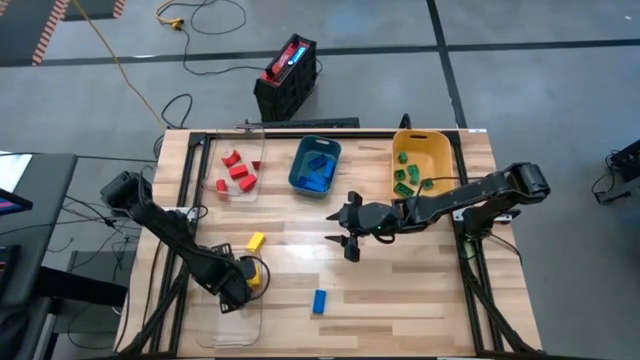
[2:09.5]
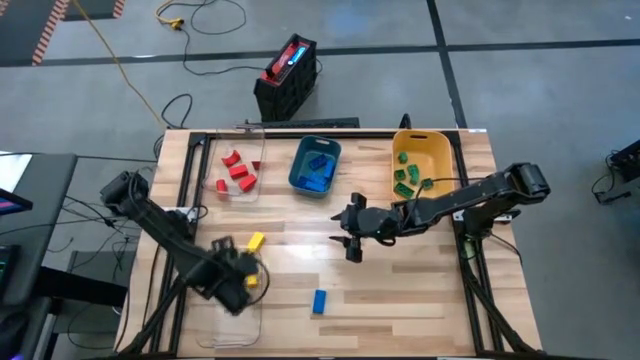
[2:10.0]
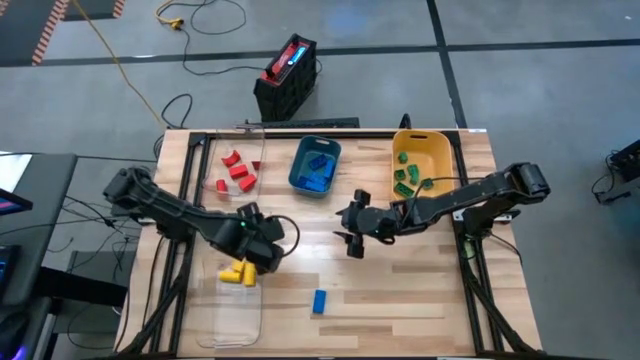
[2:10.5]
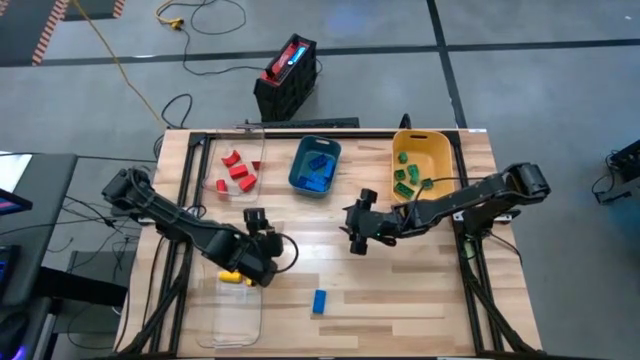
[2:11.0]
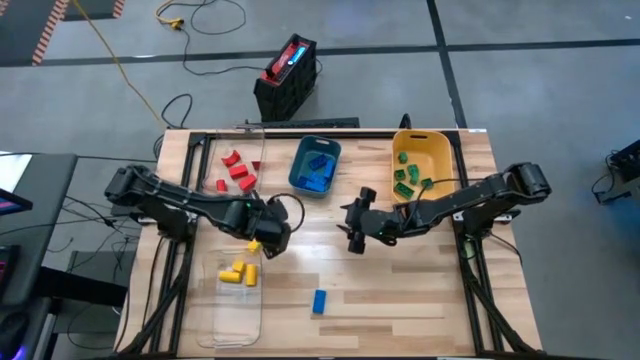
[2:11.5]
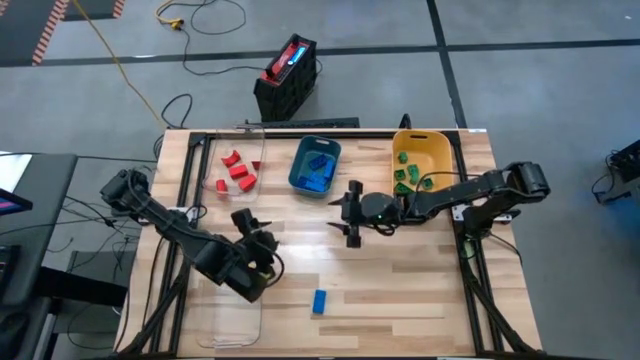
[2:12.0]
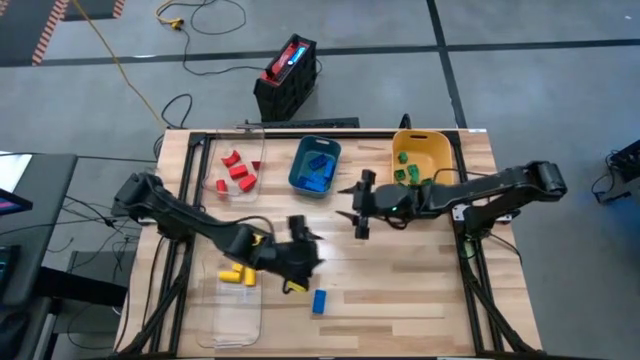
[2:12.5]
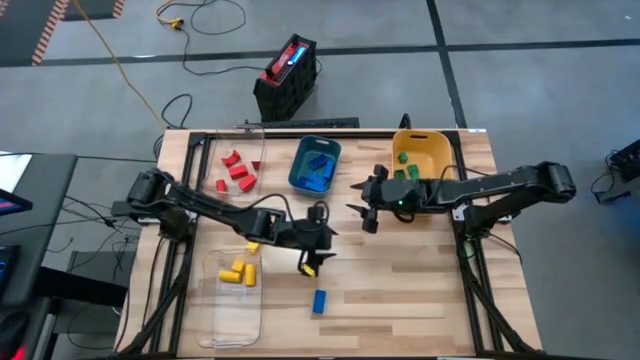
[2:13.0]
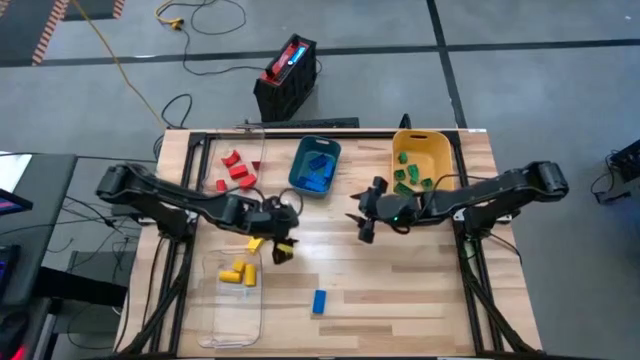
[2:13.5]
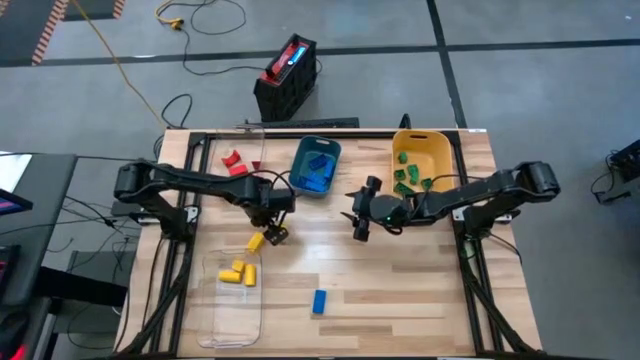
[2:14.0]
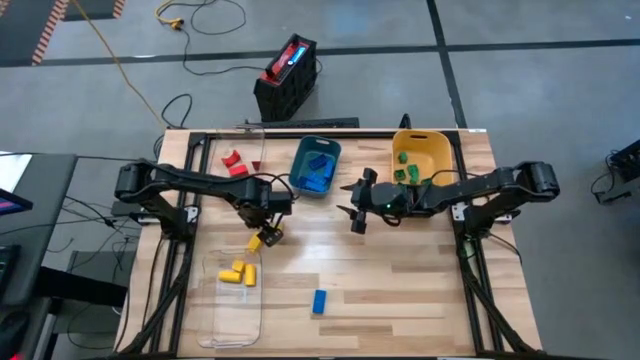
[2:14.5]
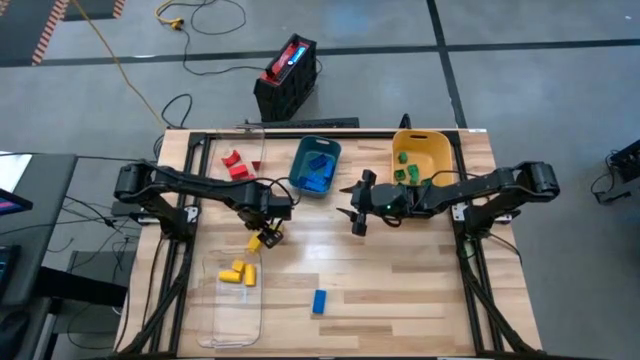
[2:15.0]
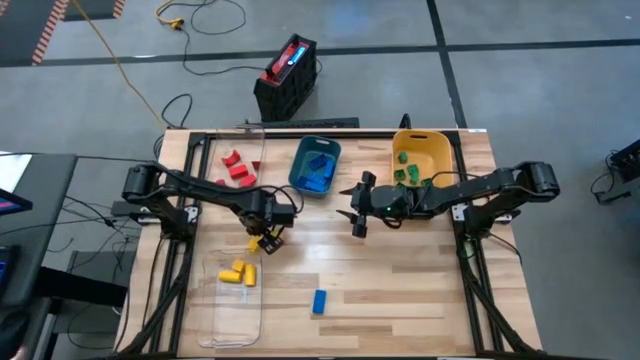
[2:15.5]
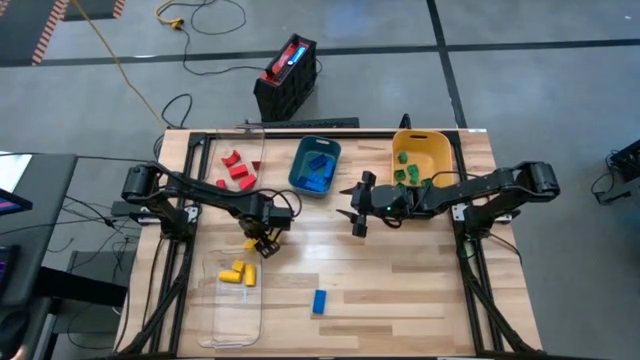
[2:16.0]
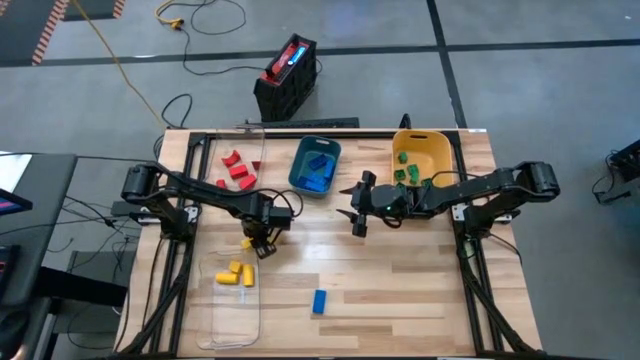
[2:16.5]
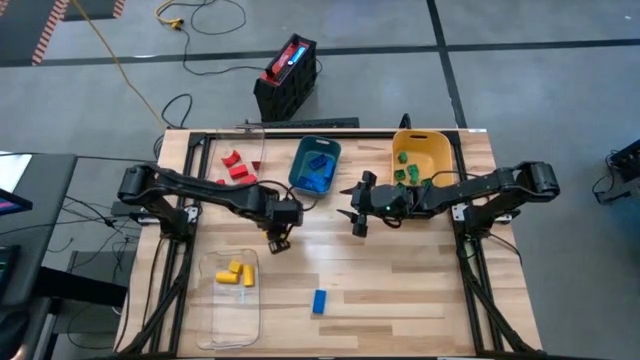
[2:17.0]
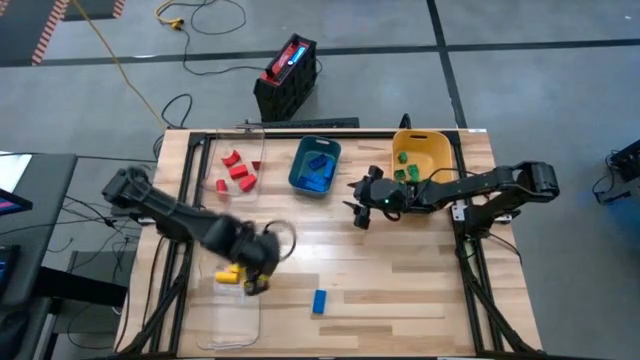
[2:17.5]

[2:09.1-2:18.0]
Task: Sort blocks
Put the yellow block into the bottom transparent bin

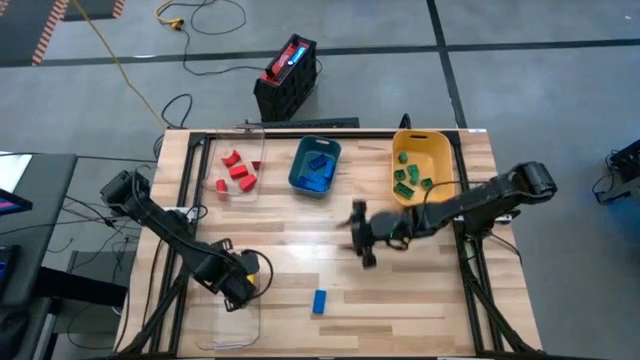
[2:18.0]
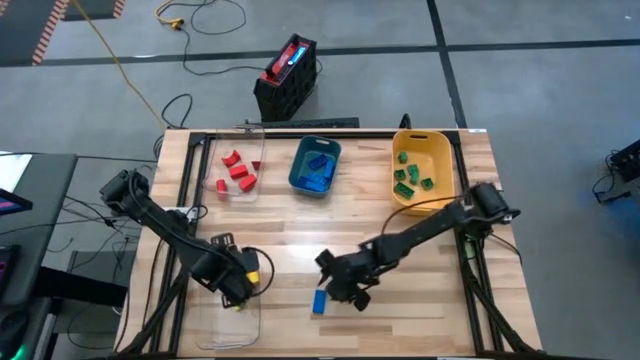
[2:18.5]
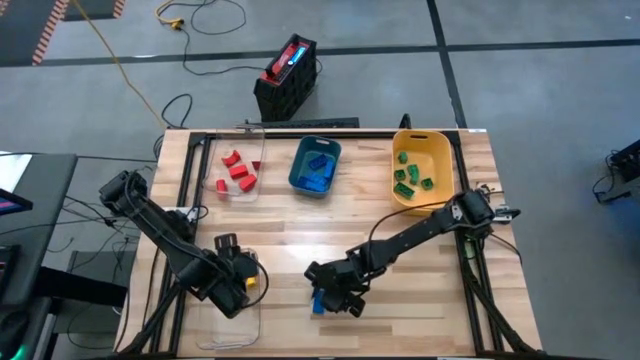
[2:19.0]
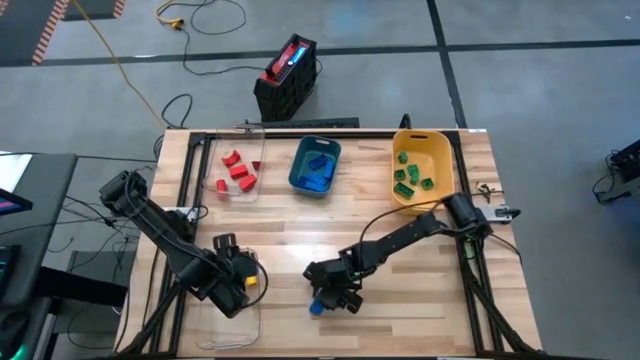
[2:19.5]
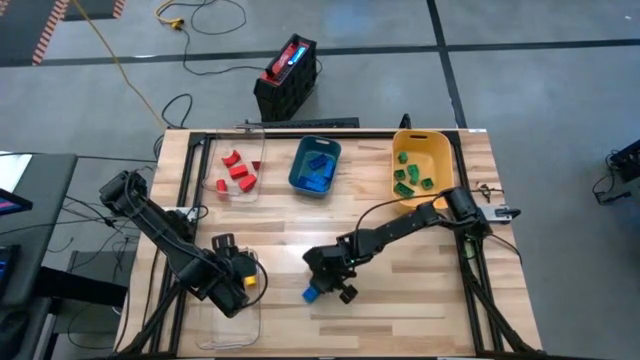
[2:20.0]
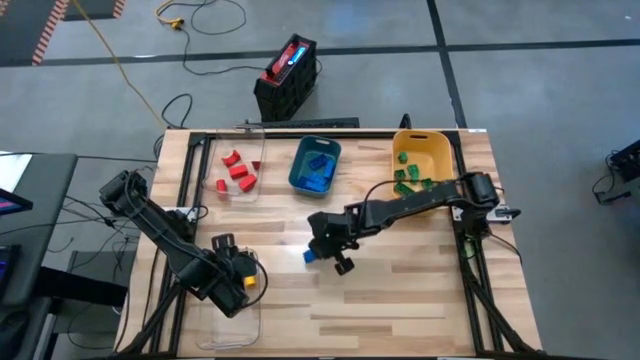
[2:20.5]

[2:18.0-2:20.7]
Put the blue game piece into the blue bin

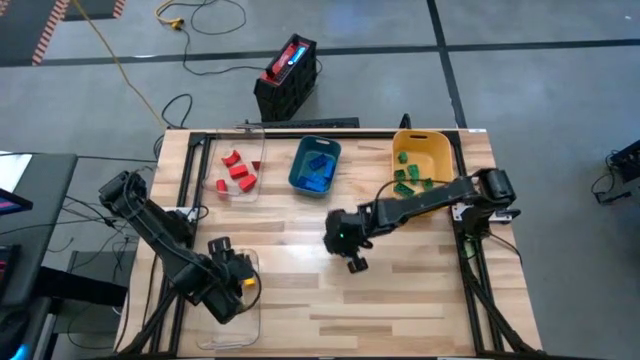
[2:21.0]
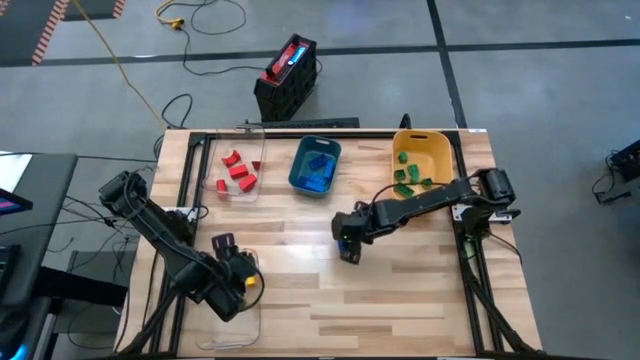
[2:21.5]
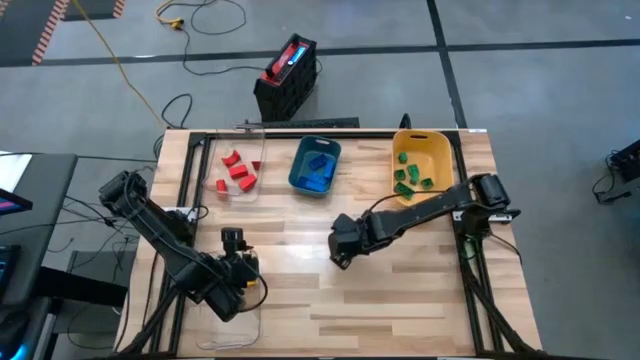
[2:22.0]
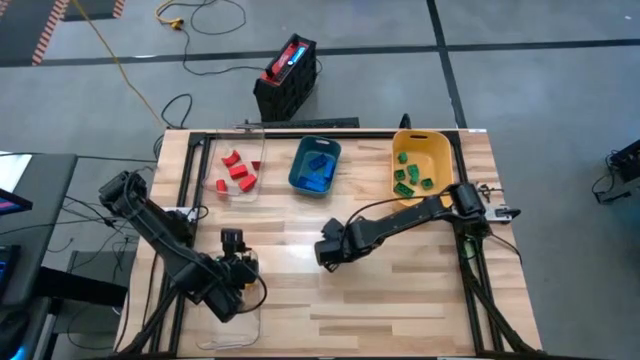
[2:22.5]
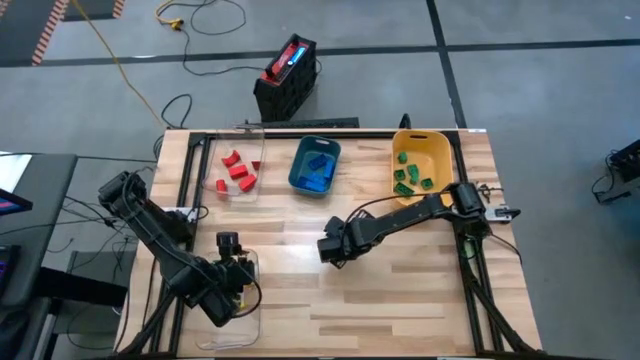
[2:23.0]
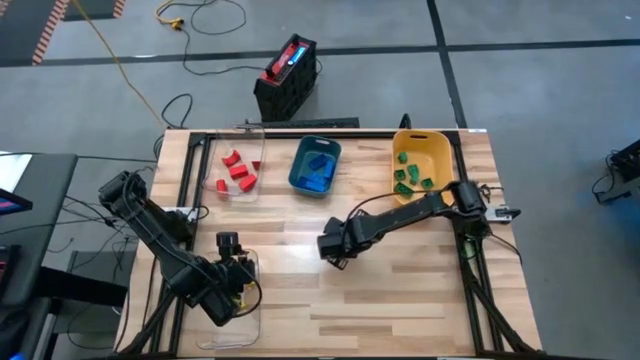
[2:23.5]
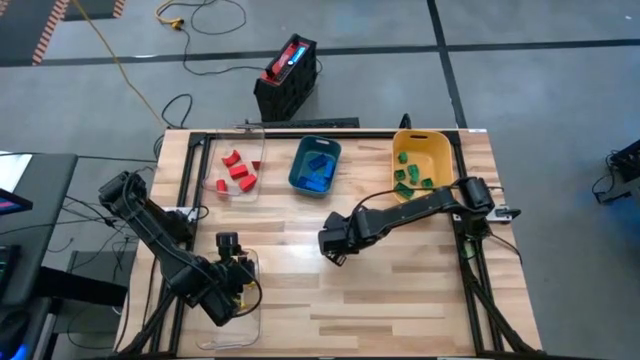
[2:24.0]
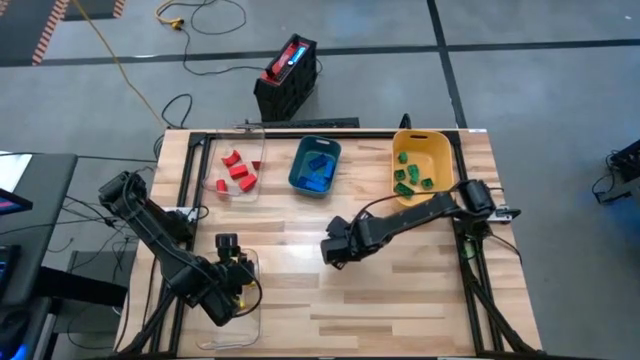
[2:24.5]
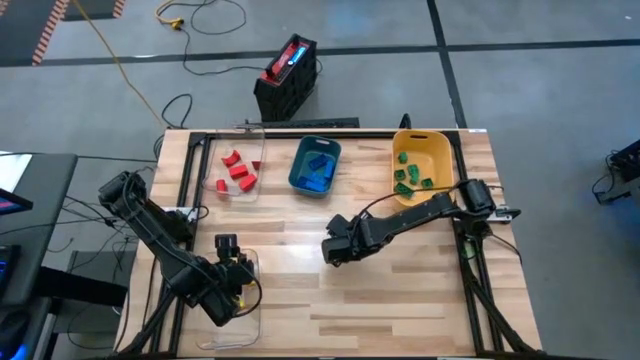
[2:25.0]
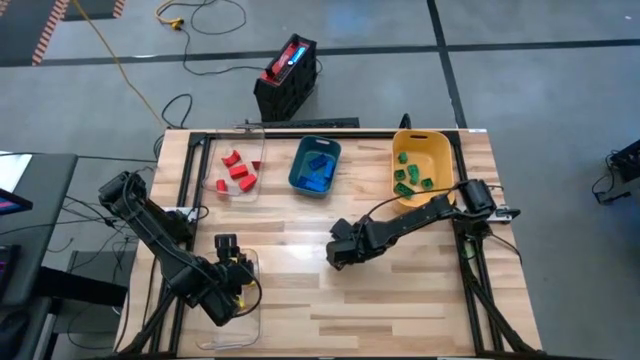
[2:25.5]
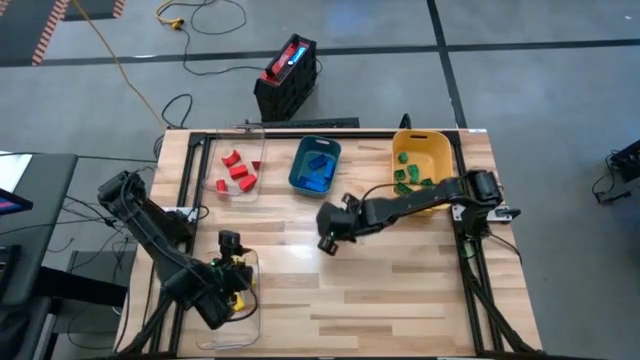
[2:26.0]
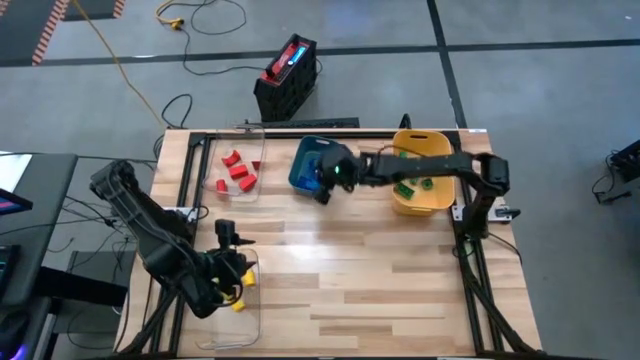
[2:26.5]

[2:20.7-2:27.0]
Put the blue game piece into the blue bin

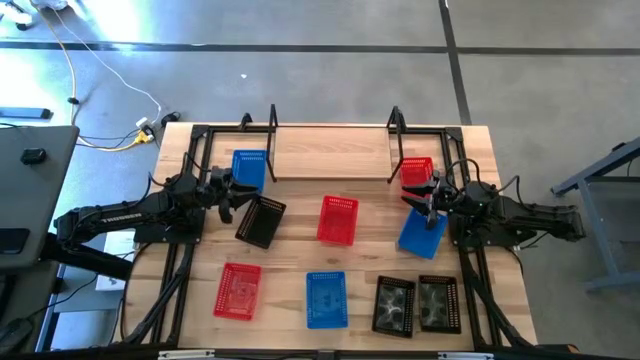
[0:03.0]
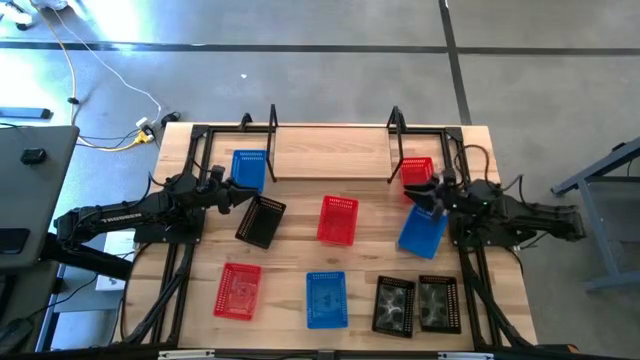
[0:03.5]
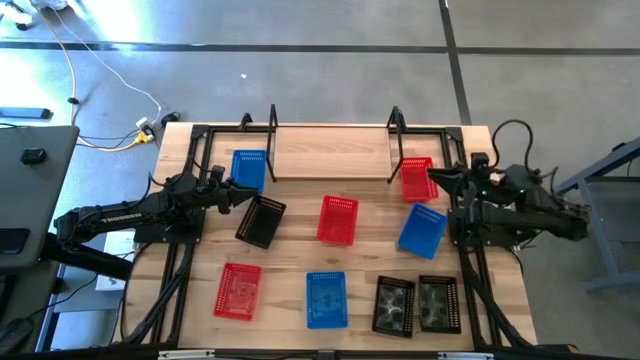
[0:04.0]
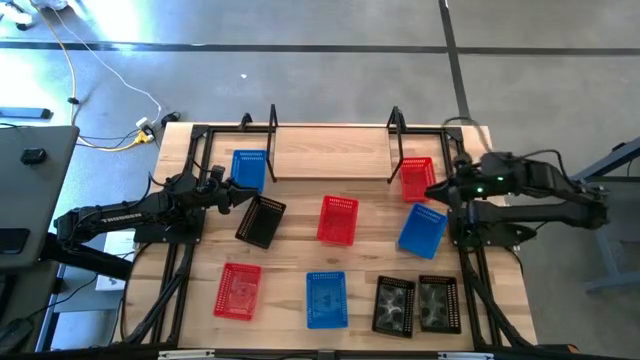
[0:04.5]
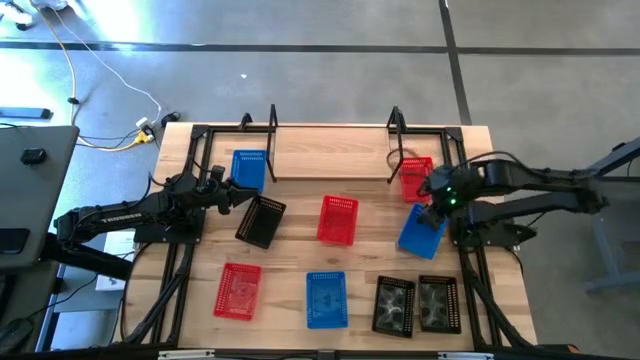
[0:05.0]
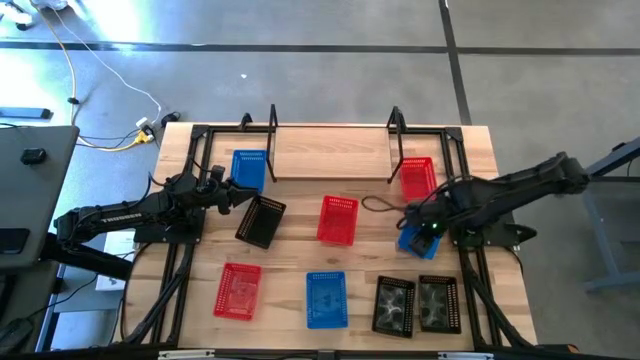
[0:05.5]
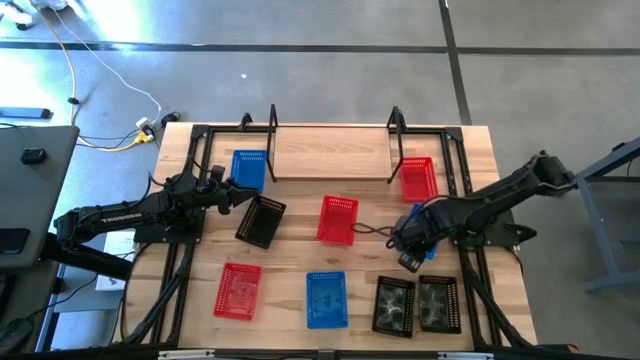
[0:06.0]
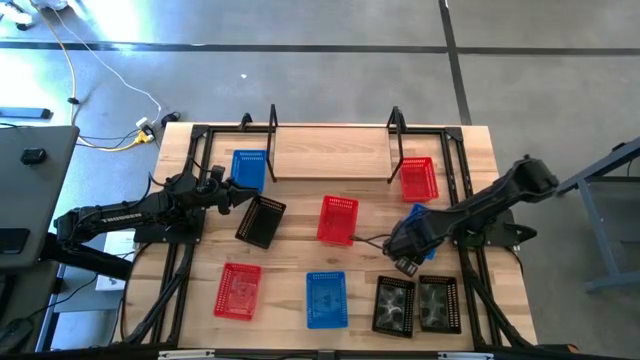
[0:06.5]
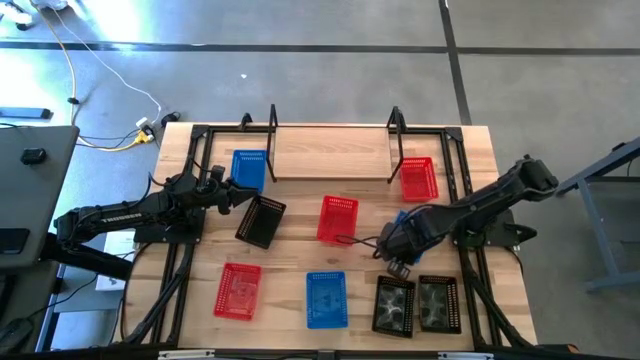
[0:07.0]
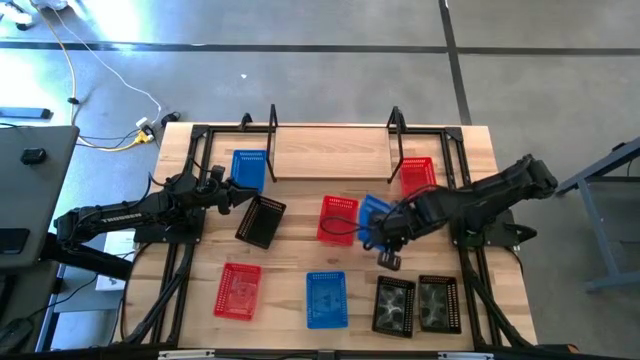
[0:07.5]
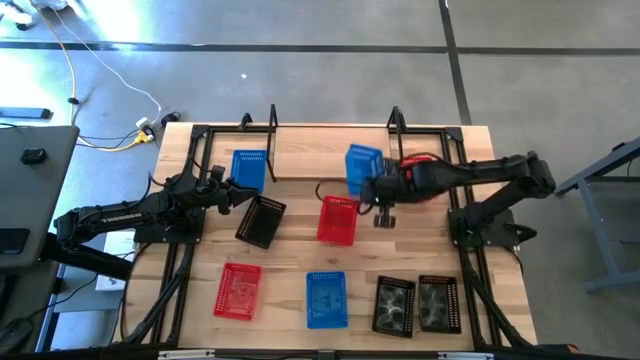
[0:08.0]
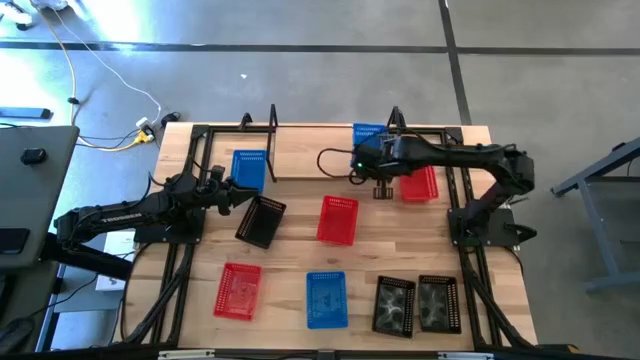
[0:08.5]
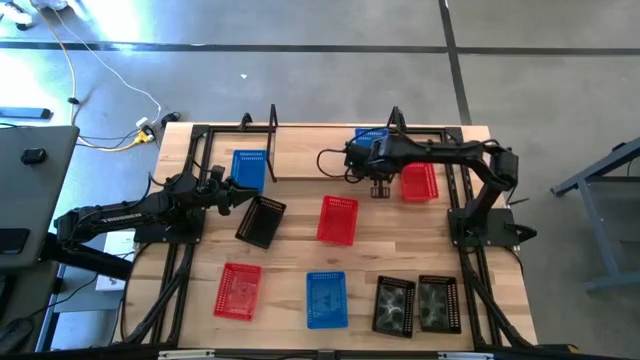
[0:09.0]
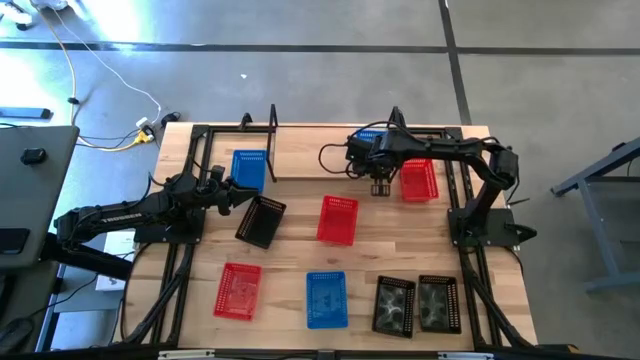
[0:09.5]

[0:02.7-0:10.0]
Task: Stack baskets on shelf by color
Put the middle right blue basket on the shelf
